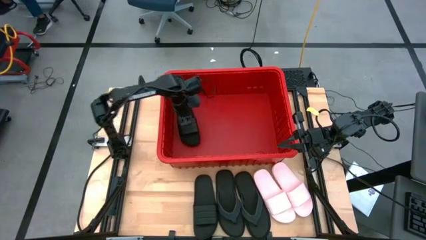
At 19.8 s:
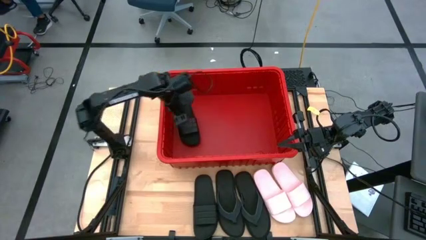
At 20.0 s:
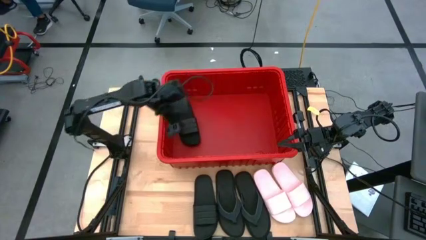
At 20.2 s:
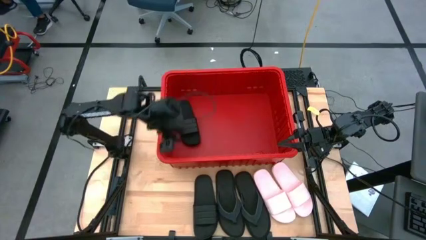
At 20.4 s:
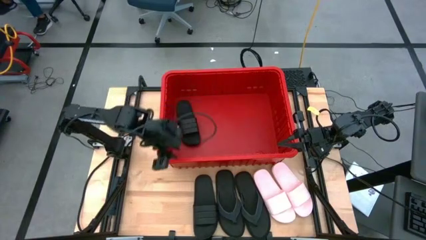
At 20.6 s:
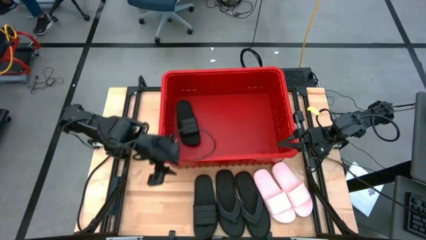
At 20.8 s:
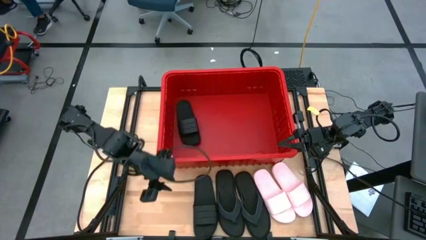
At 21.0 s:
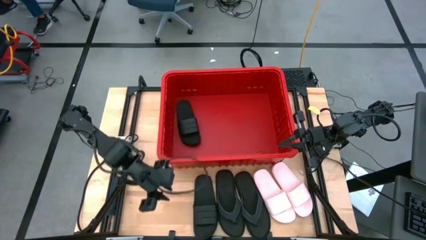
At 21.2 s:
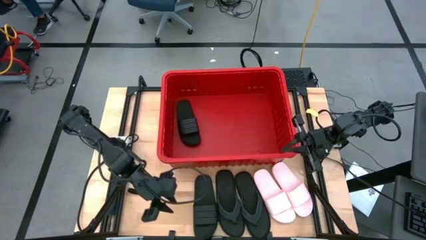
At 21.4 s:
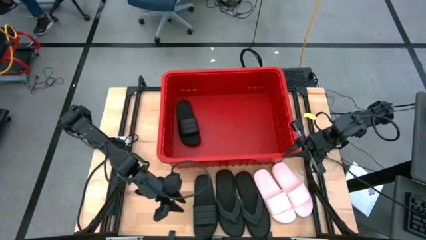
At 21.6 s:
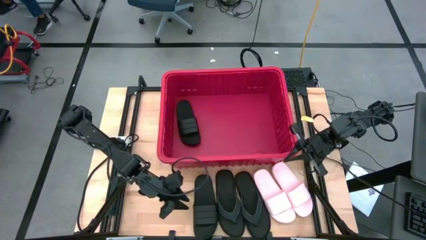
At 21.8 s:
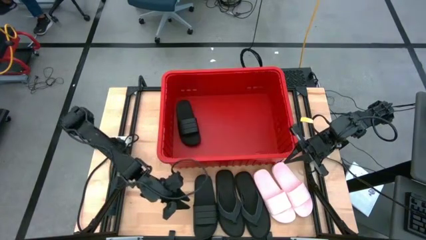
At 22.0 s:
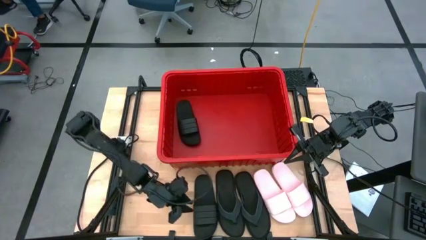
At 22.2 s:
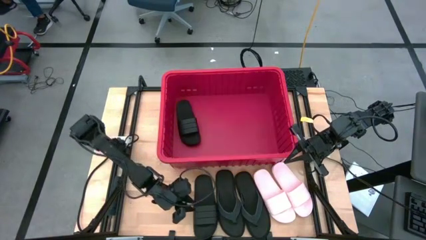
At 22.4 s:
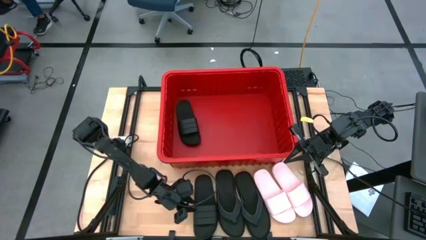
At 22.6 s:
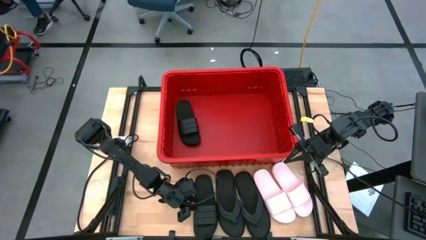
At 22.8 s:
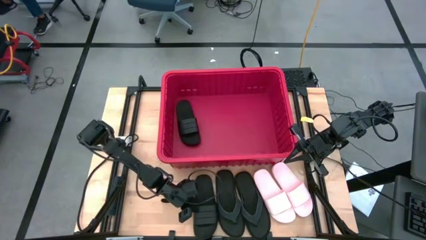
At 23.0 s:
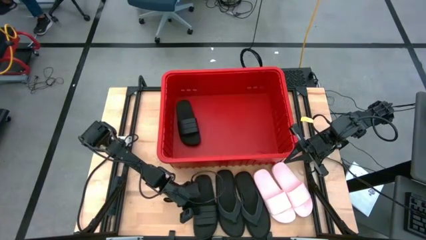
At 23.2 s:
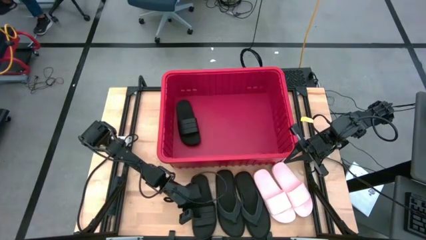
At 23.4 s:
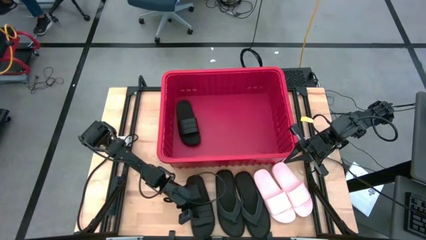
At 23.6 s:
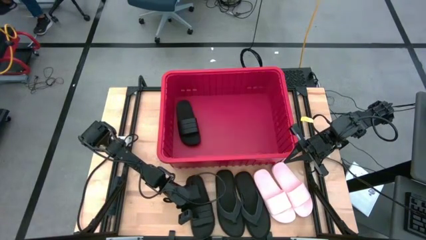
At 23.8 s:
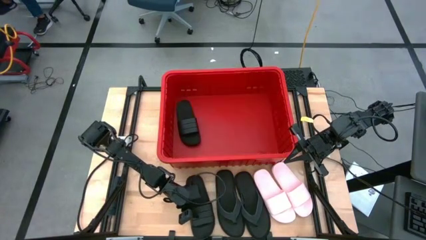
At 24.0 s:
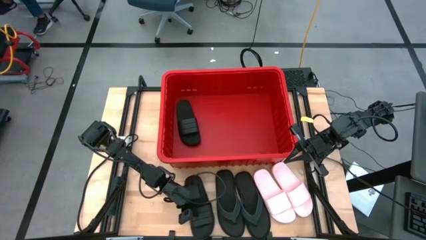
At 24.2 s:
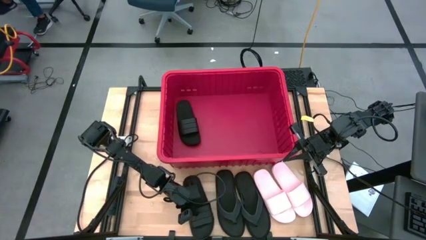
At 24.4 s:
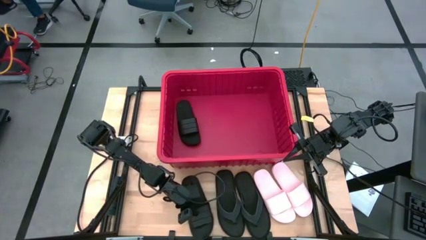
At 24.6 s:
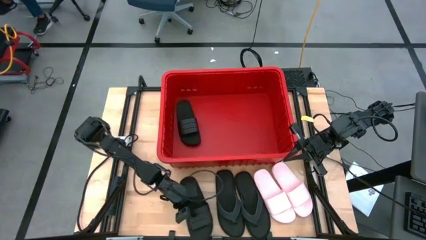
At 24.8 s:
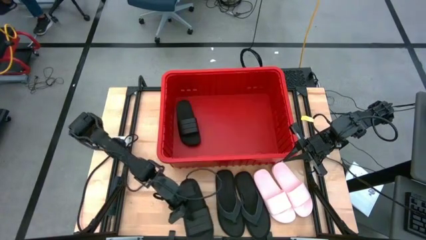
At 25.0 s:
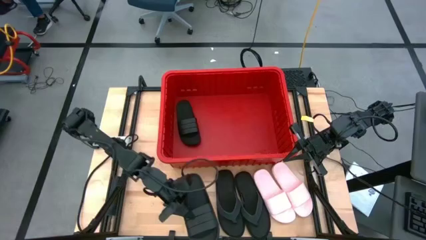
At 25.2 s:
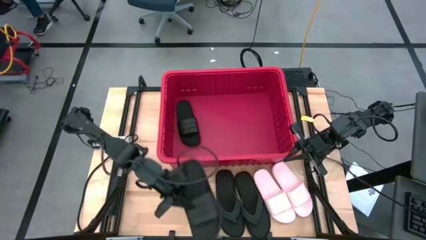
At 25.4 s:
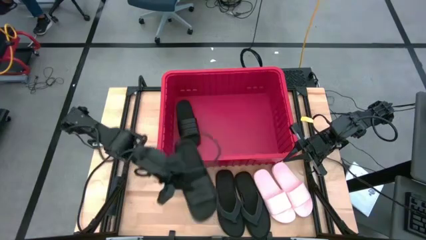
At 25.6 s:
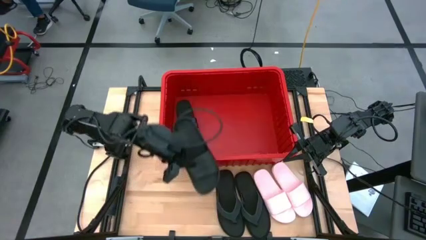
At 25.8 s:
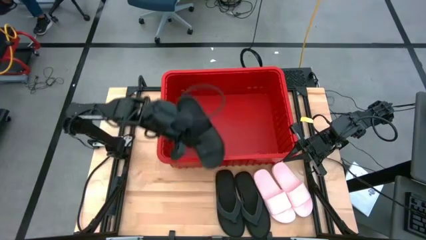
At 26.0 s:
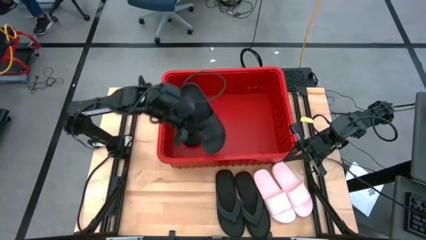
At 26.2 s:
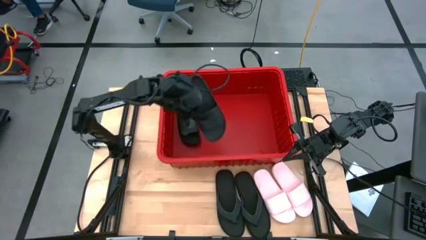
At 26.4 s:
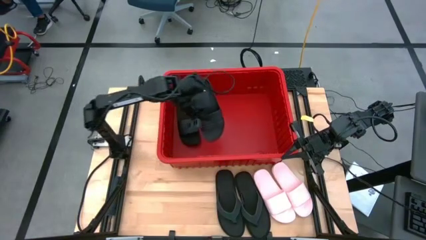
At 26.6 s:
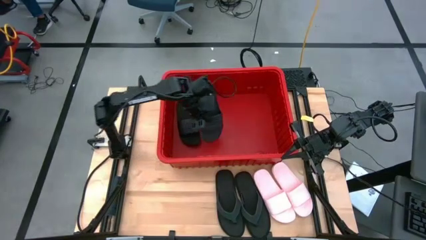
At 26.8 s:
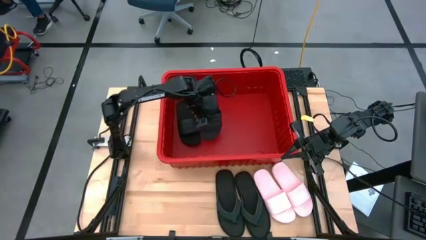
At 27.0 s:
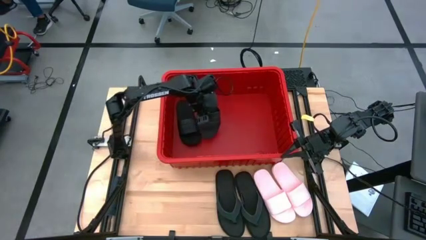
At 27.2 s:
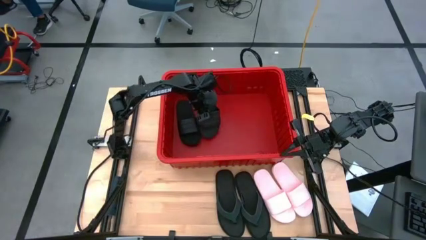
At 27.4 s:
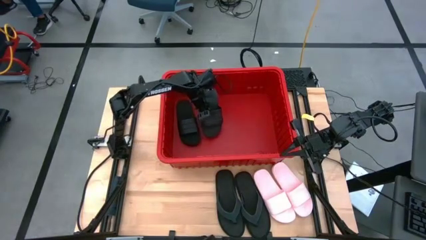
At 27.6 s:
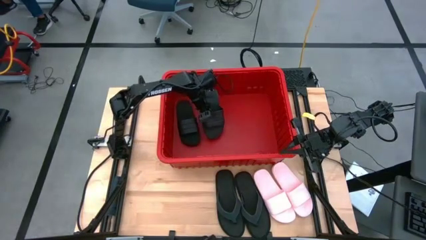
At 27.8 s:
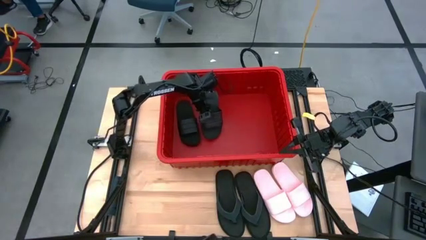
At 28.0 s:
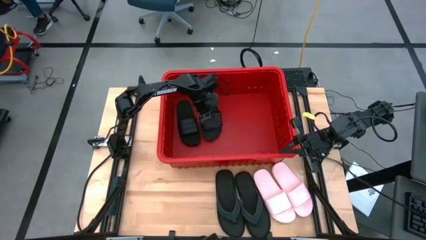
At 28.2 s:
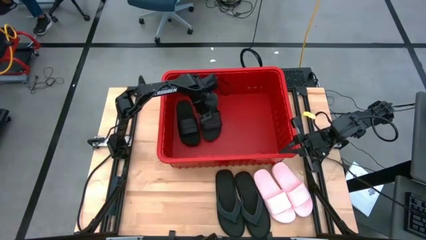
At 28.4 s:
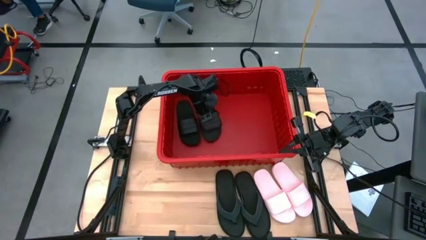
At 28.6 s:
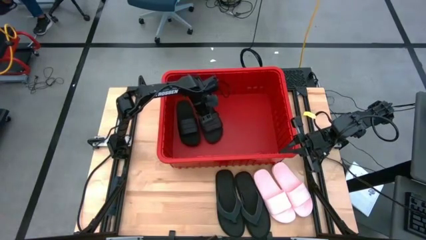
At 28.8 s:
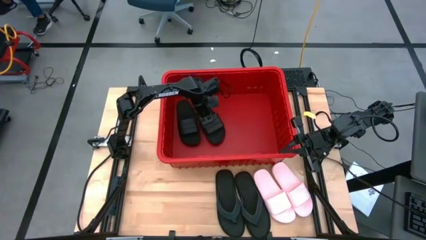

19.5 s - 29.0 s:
Task: Pick and place slides into bin
Put the black slide into the red container
